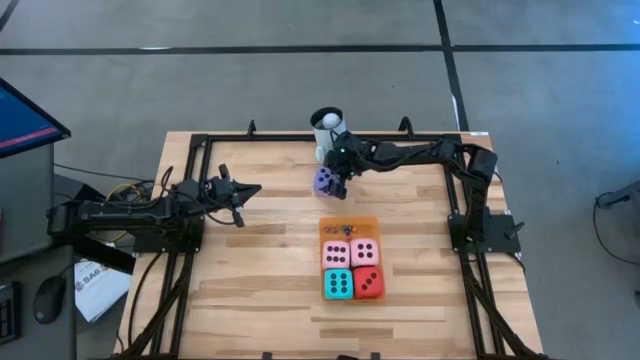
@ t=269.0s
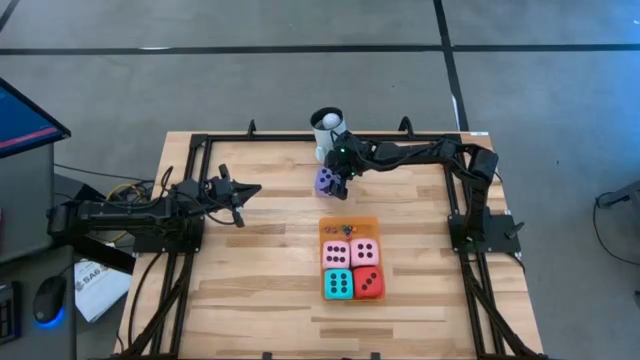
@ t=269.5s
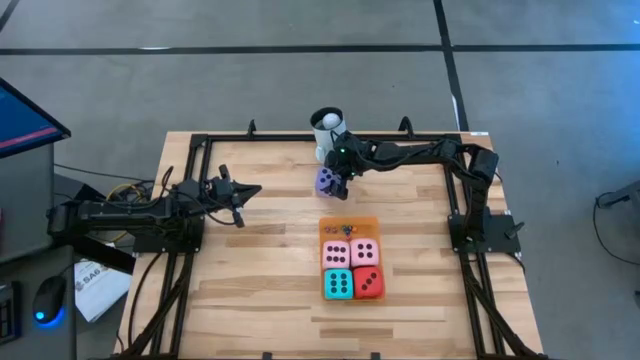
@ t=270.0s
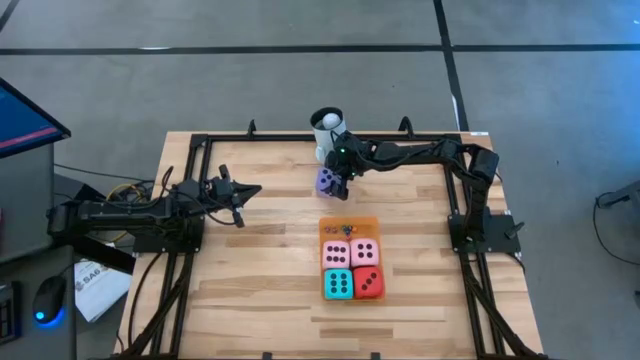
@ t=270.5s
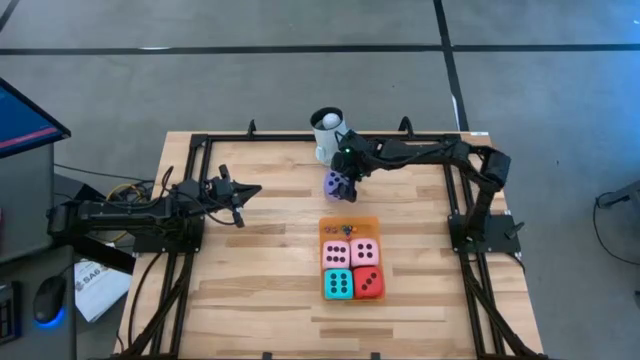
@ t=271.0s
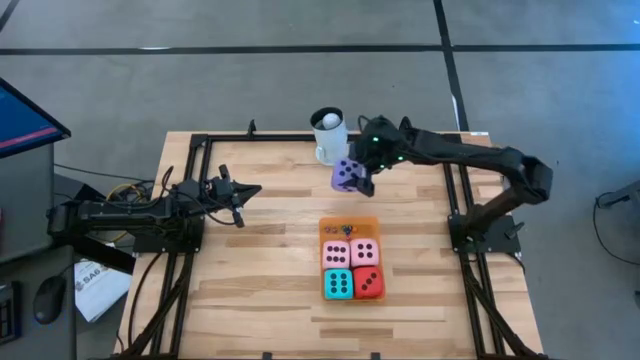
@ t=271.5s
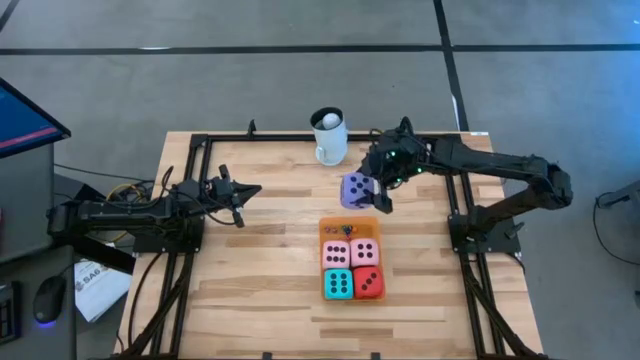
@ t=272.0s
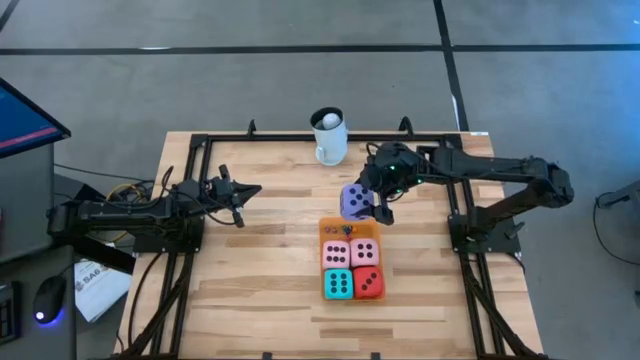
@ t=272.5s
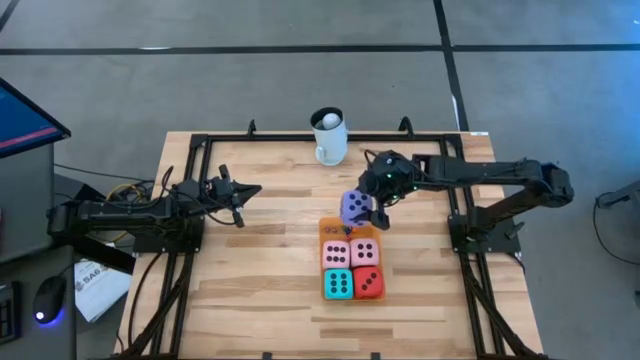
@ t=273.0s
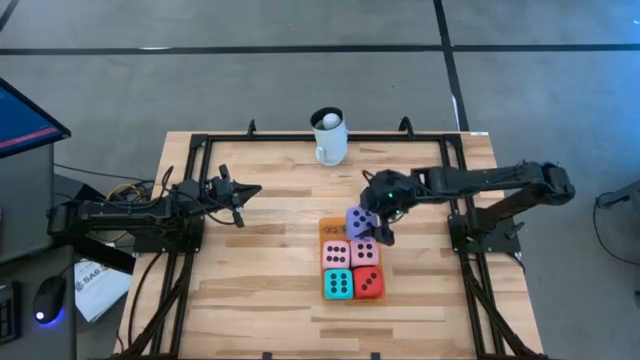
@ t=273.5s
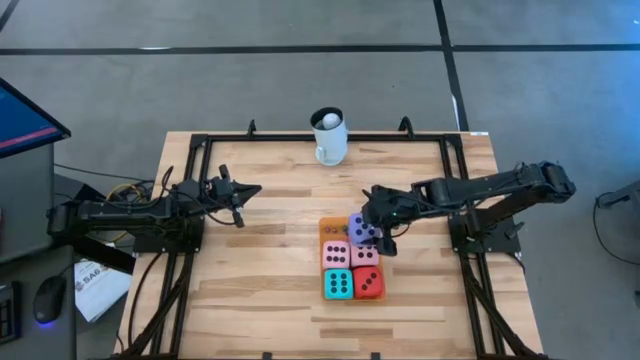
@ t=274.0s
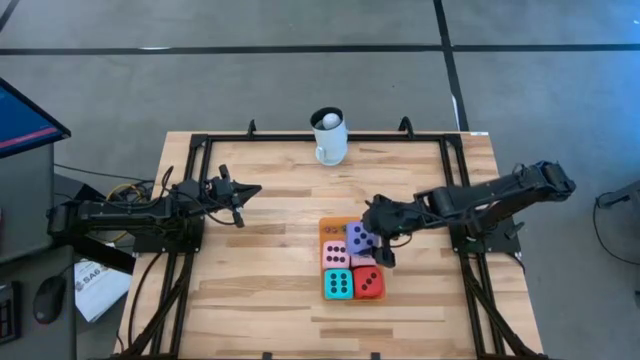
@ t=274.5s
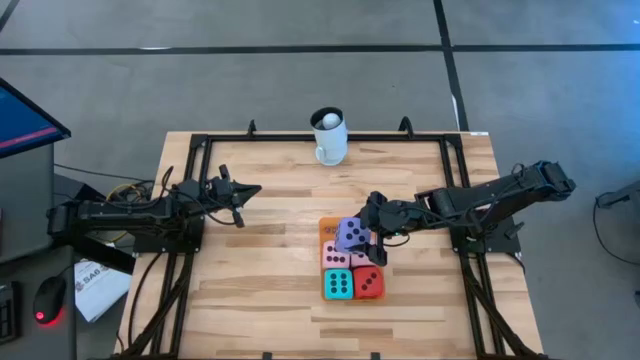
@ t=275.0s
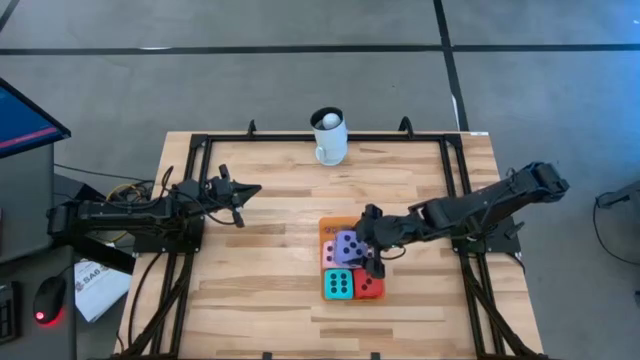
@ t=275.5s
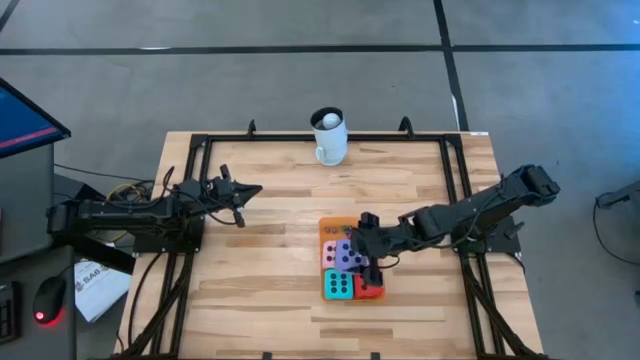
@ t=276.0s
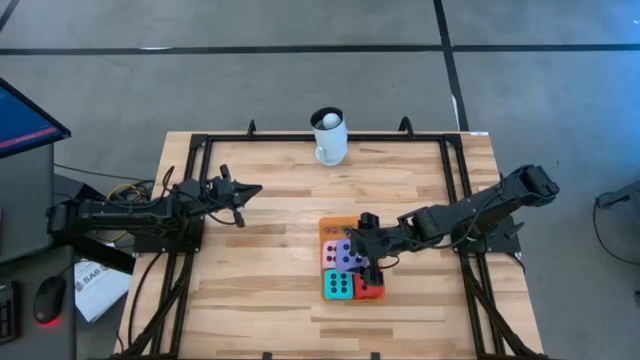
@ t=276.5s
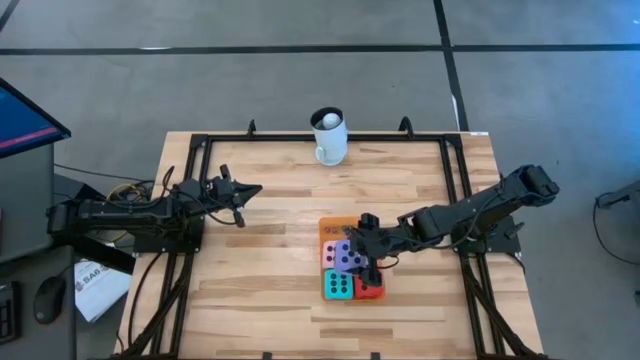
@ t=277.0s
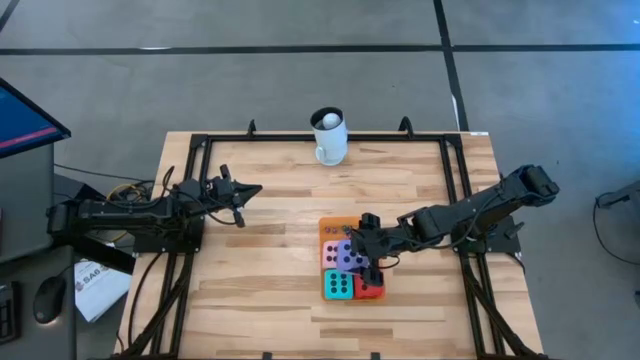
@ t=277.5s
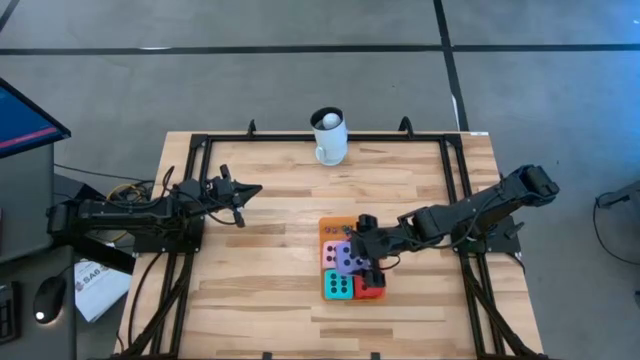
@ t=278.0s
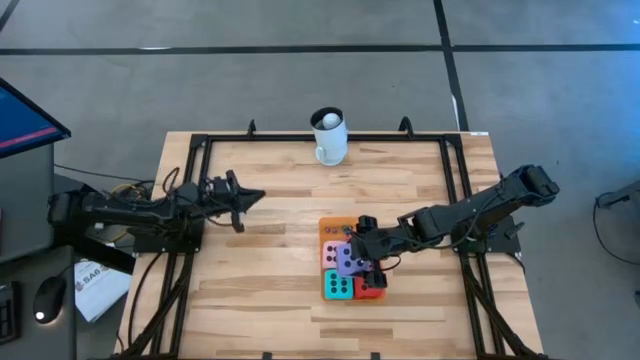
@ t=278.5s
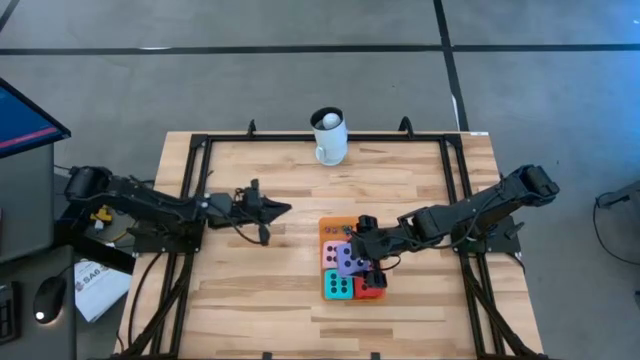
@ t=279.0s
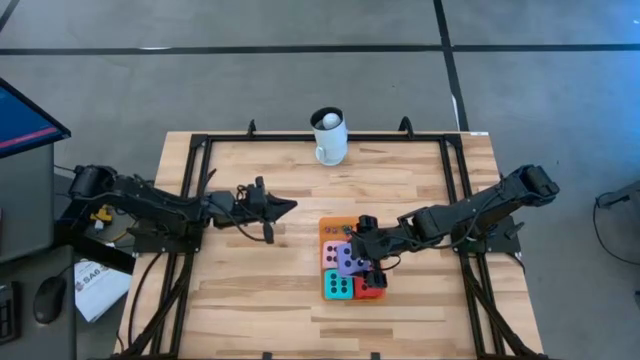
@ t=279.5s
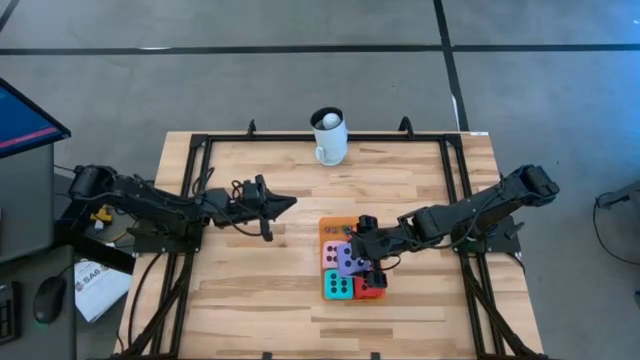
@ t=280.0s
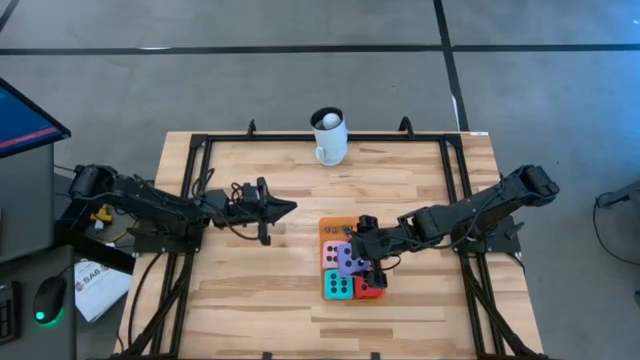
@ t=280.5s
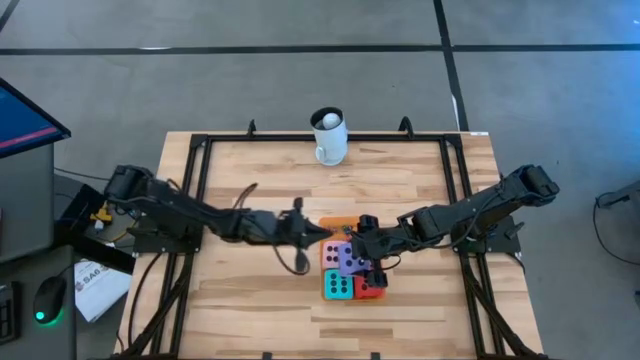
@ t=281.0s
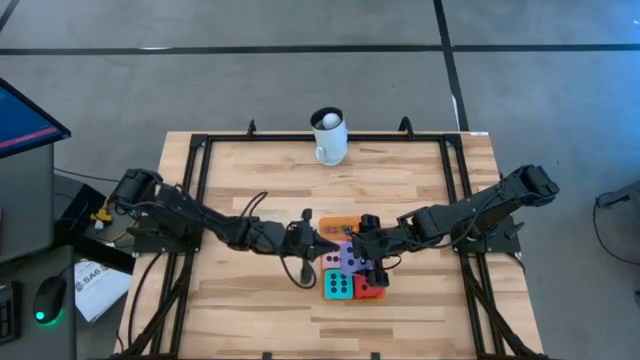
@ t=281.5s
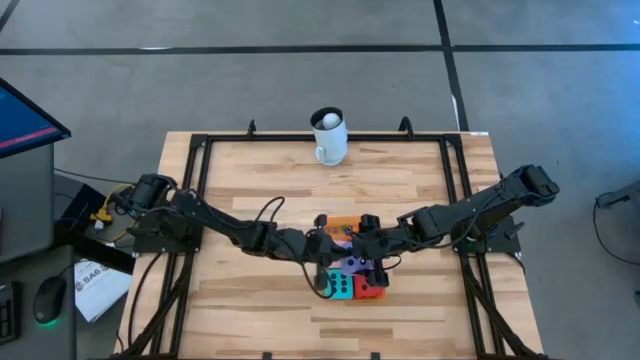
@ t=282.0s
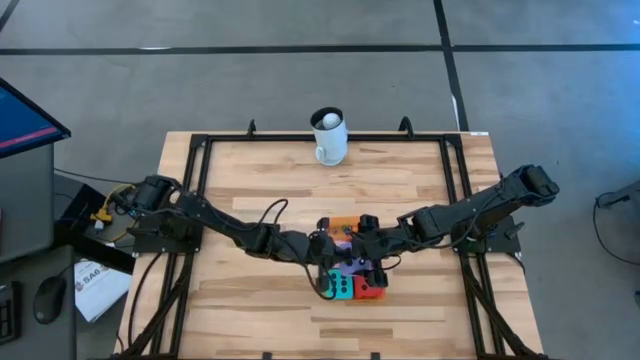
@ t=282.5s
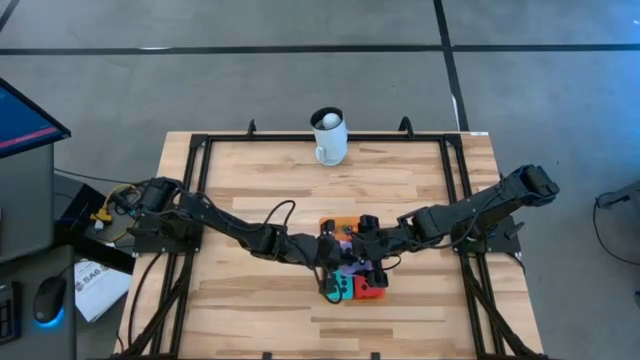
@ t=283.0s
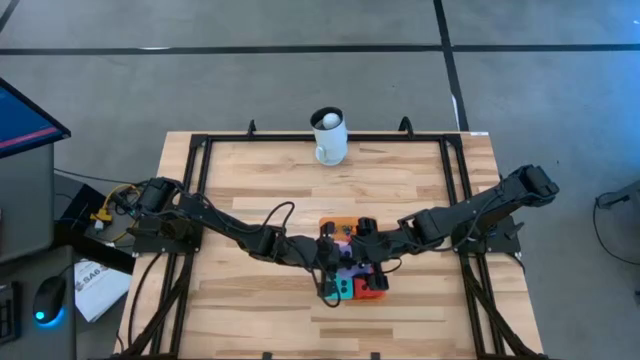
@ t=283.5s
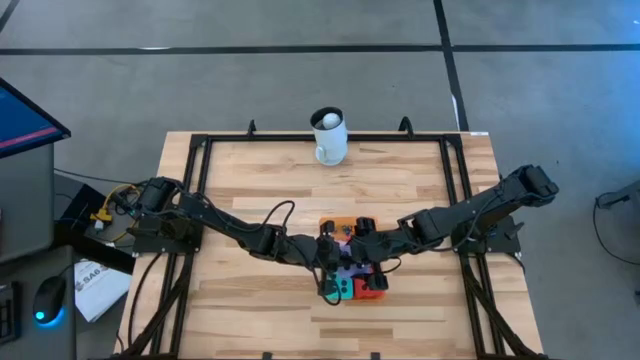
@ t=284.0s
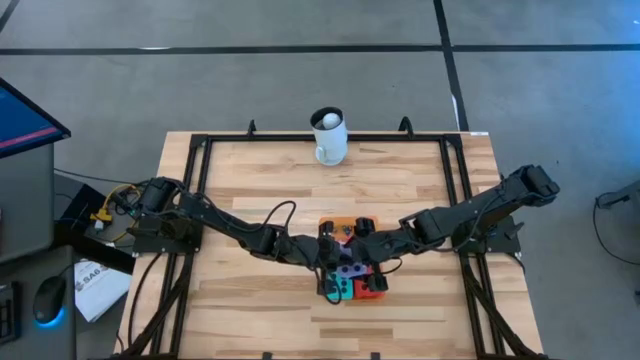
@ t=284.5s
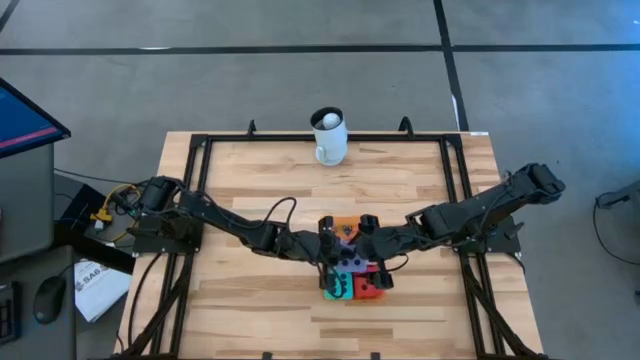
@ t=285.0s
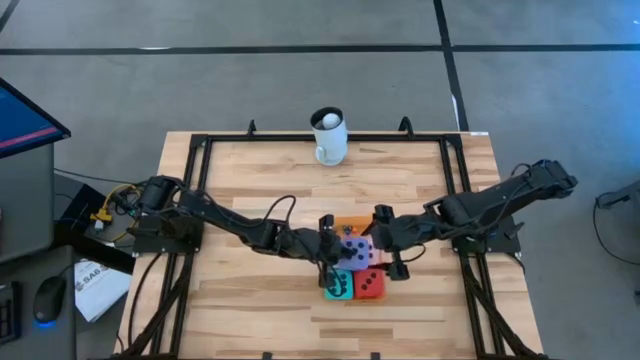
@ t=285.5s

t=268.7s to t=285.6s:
Task: Pick & Place Dice
Put the large purple dice into the orange bin

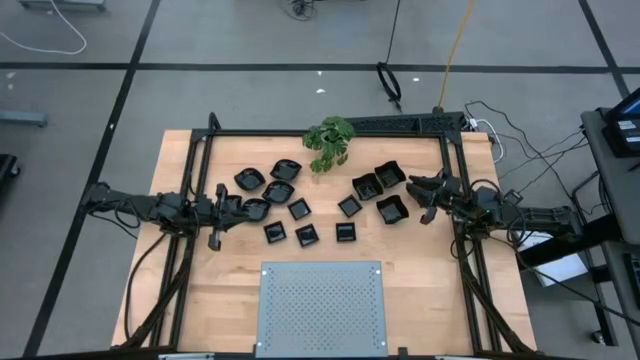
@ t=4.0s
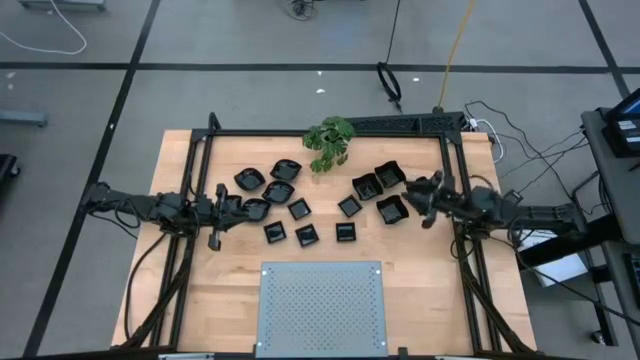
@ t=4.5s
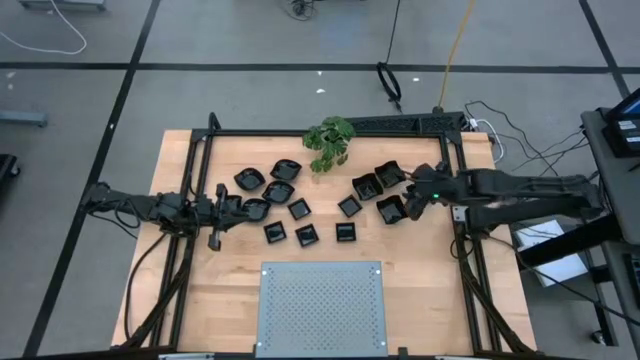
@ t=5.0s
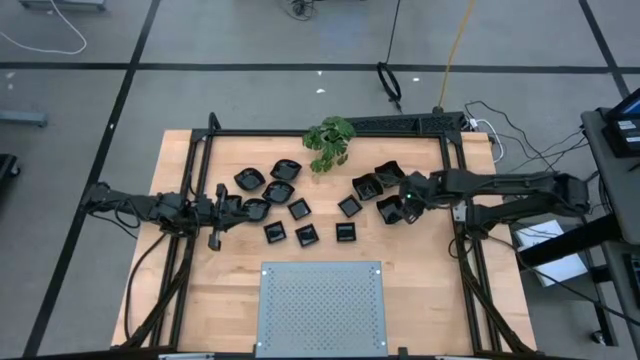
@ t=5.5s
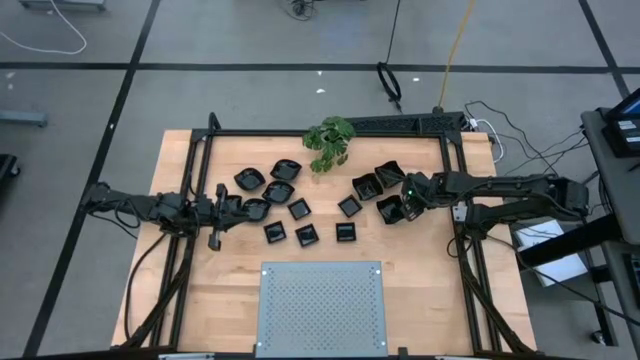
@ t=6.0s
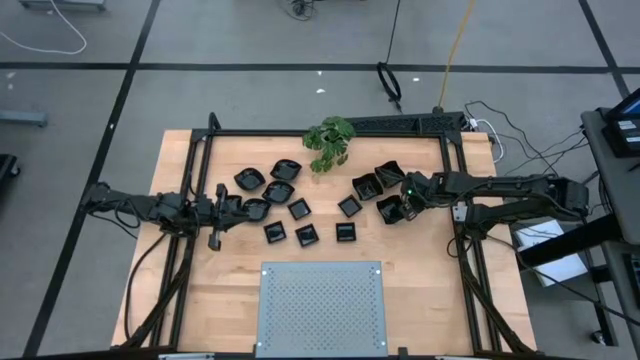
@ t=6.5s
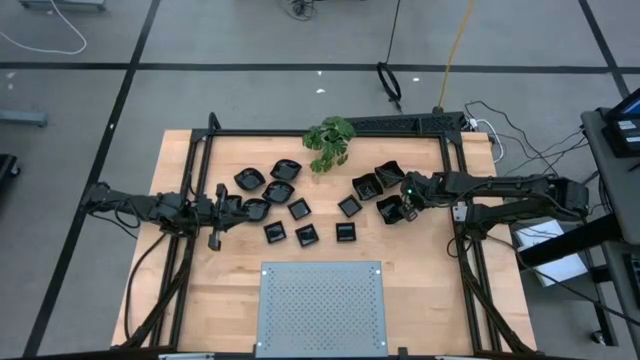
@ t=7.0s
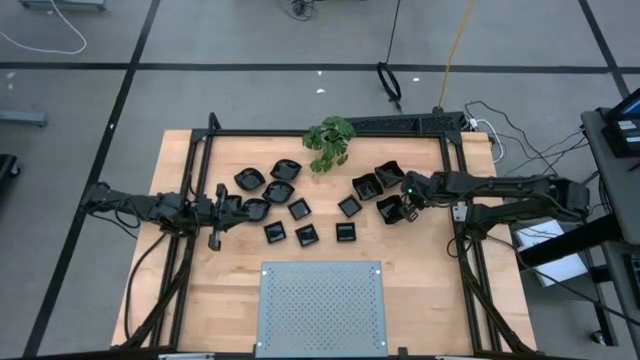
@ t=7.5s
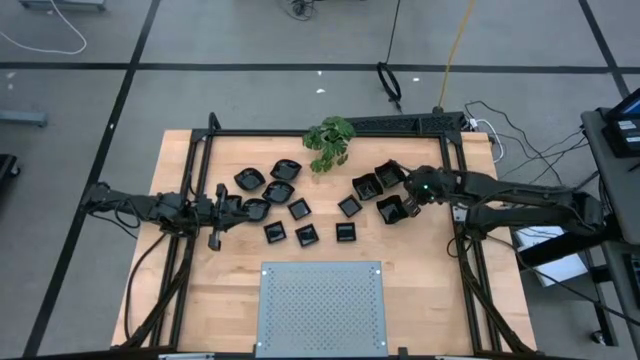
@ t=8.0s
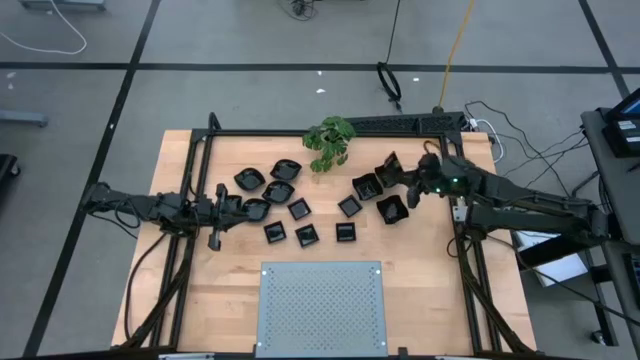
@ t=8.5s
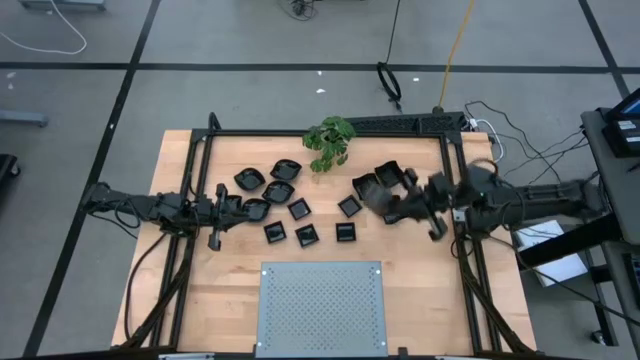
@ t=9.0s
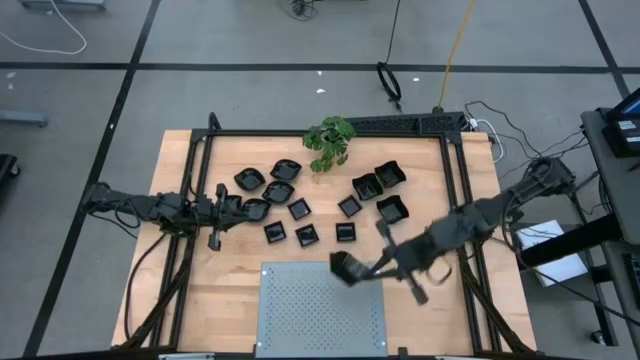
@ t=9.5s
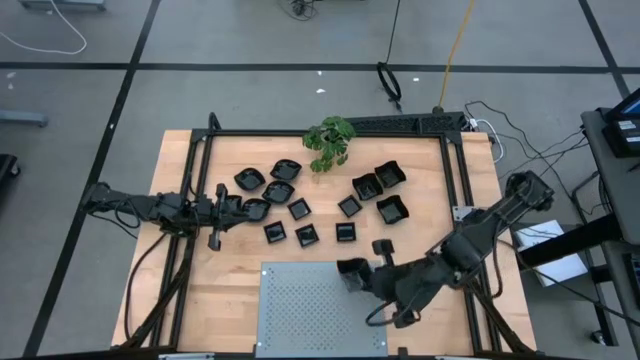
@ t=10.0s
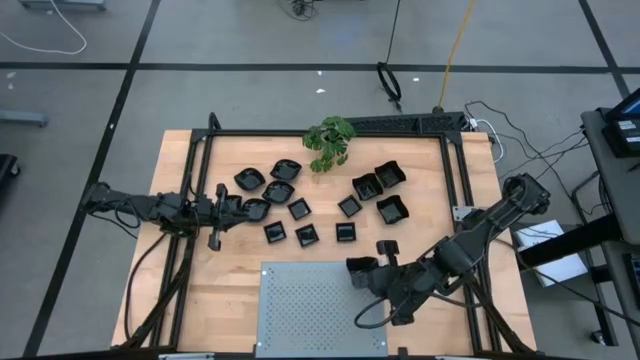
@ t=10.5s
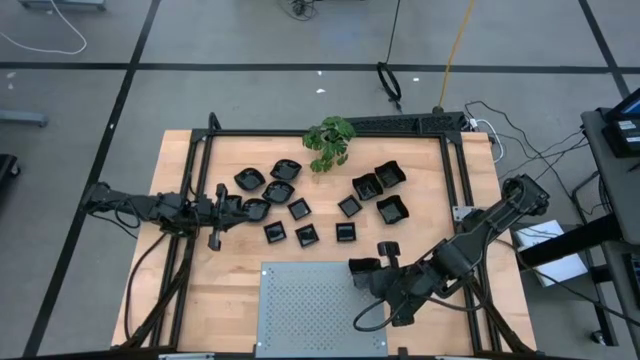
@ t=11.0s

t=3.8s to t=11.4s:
Task: Pick & Place Mini shaped plates
Put the distorted square plate on the shelf
